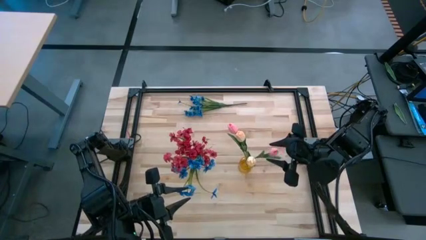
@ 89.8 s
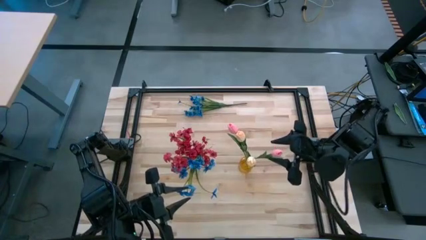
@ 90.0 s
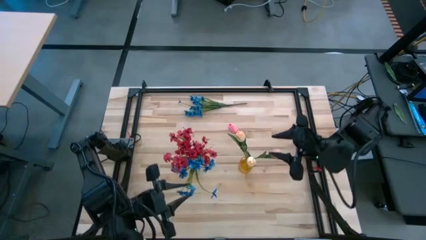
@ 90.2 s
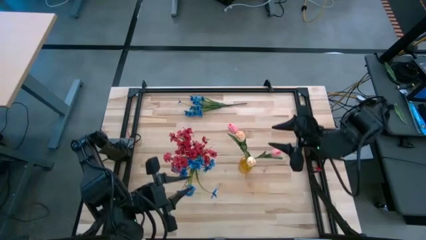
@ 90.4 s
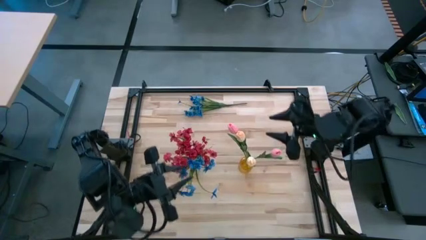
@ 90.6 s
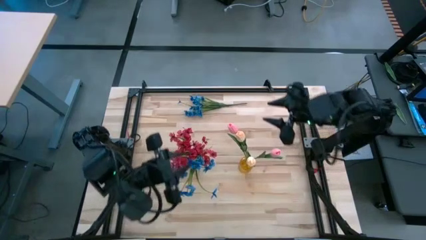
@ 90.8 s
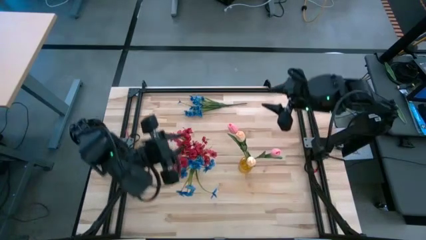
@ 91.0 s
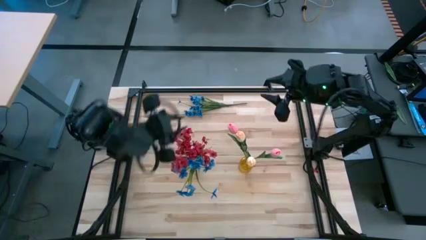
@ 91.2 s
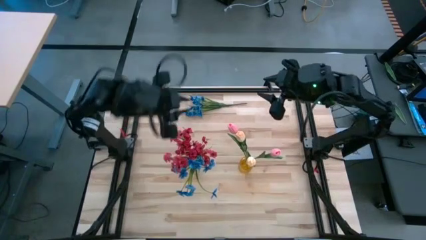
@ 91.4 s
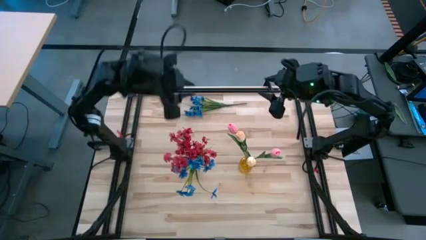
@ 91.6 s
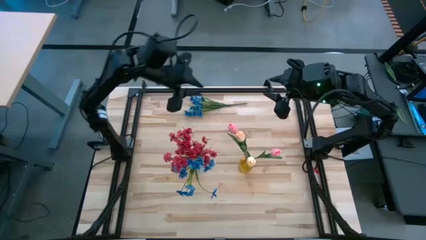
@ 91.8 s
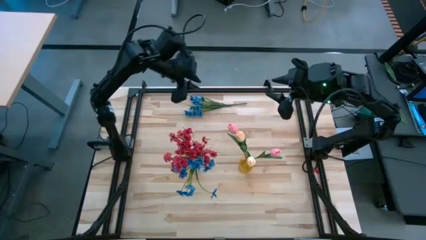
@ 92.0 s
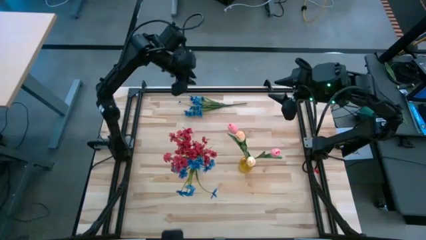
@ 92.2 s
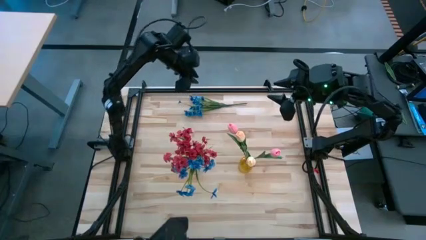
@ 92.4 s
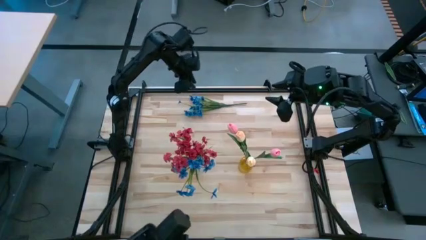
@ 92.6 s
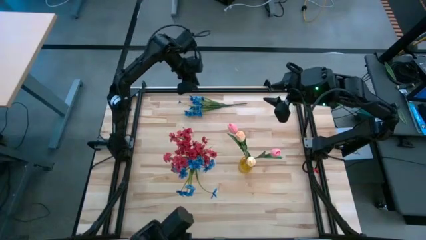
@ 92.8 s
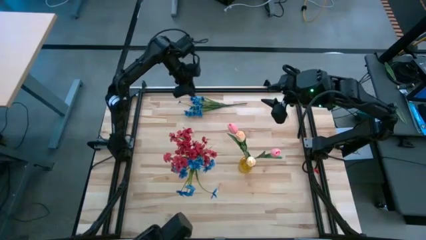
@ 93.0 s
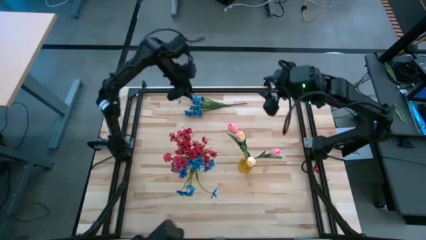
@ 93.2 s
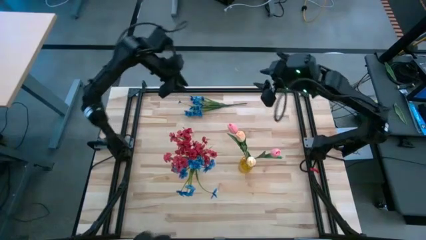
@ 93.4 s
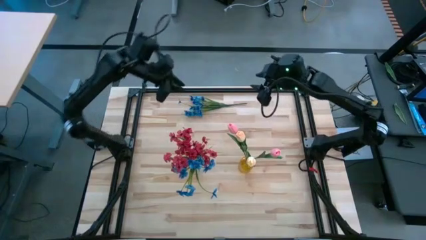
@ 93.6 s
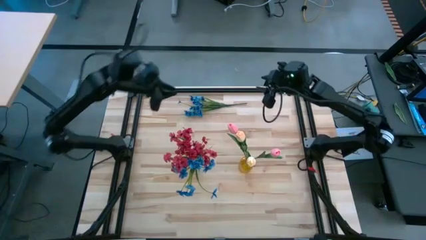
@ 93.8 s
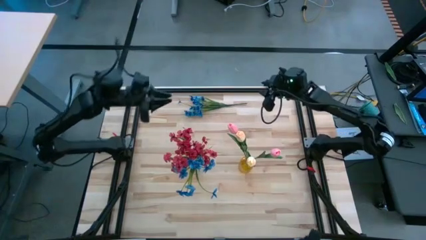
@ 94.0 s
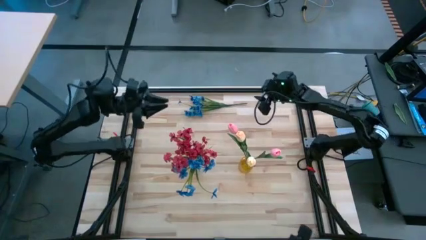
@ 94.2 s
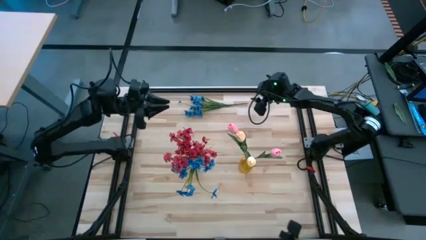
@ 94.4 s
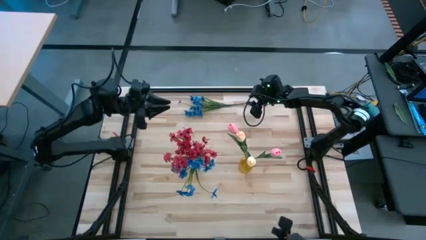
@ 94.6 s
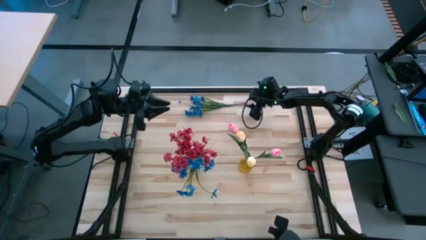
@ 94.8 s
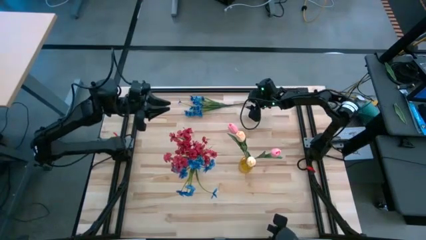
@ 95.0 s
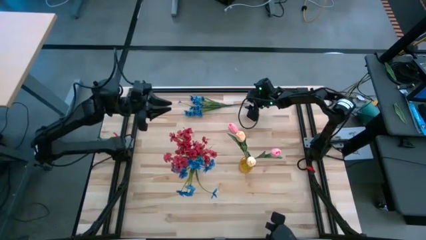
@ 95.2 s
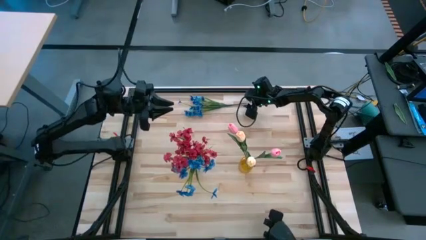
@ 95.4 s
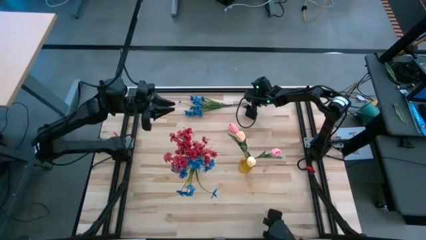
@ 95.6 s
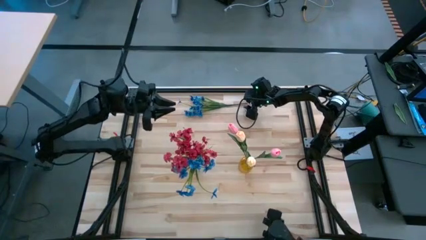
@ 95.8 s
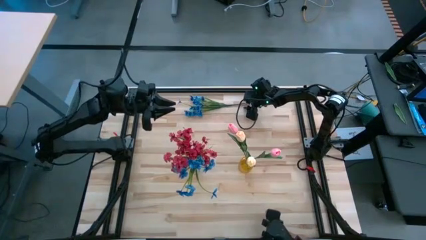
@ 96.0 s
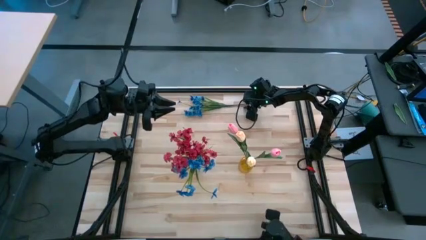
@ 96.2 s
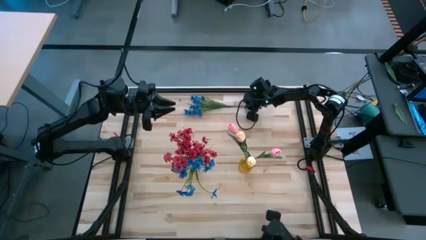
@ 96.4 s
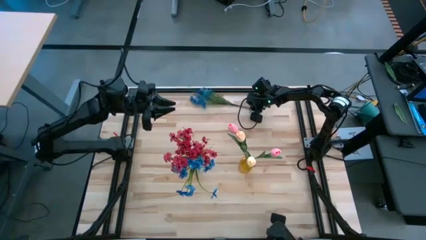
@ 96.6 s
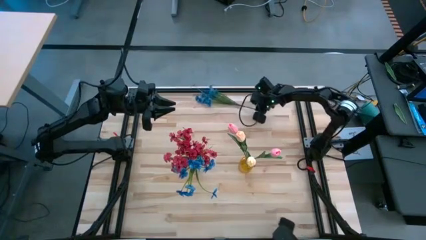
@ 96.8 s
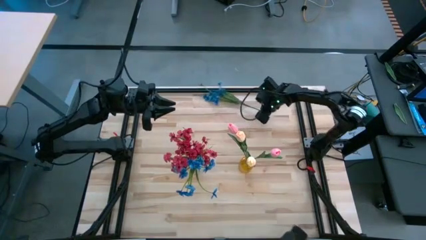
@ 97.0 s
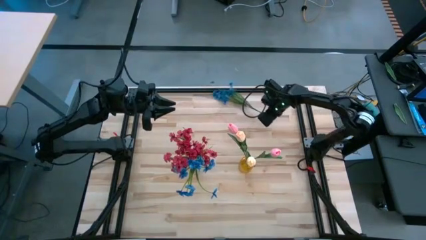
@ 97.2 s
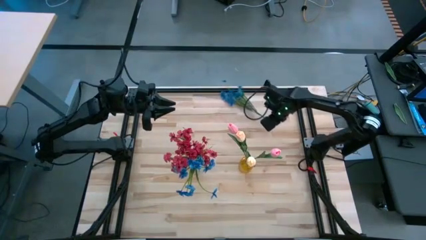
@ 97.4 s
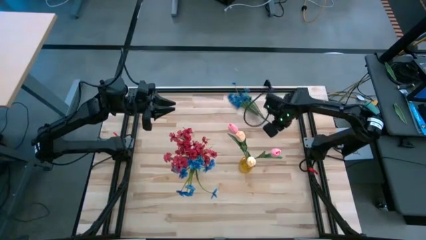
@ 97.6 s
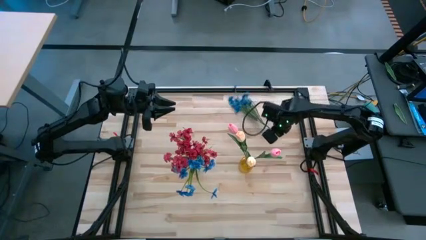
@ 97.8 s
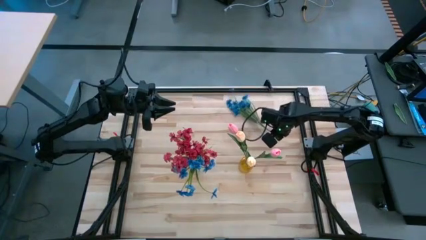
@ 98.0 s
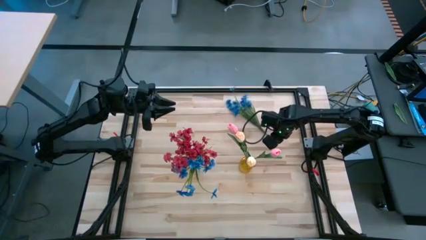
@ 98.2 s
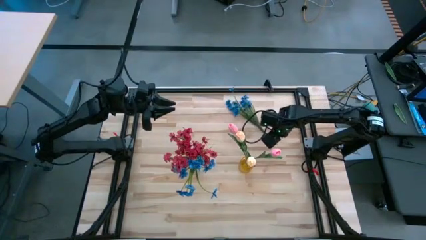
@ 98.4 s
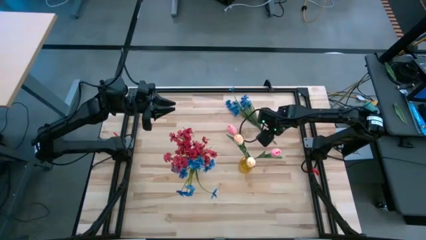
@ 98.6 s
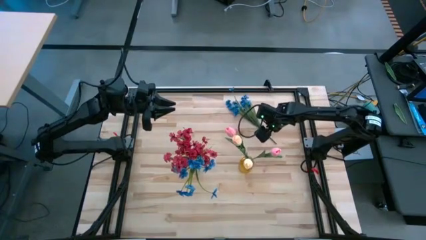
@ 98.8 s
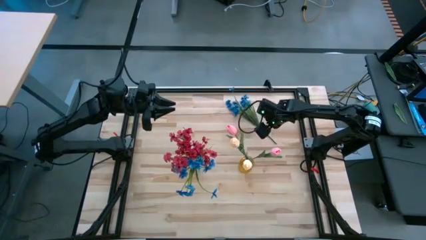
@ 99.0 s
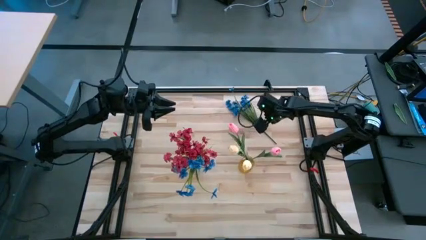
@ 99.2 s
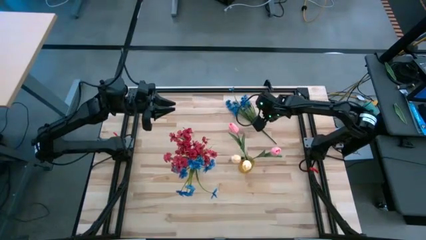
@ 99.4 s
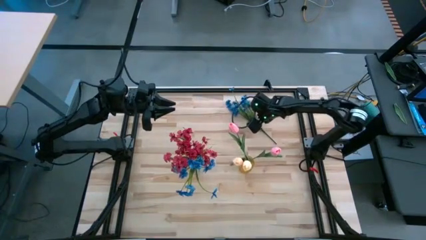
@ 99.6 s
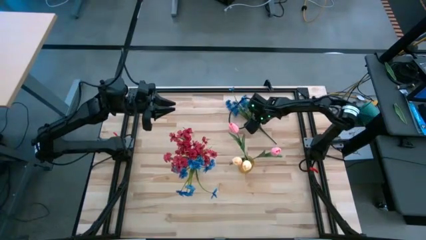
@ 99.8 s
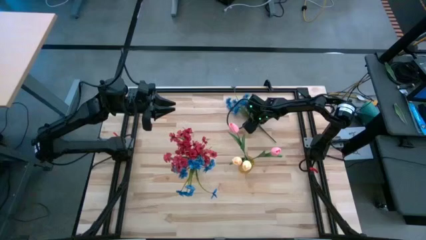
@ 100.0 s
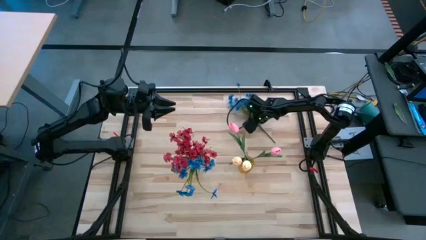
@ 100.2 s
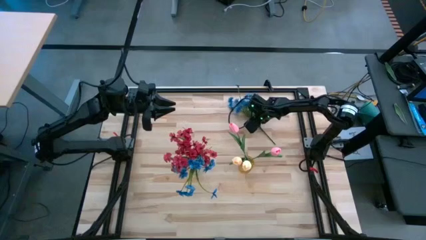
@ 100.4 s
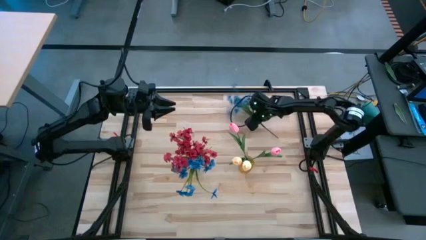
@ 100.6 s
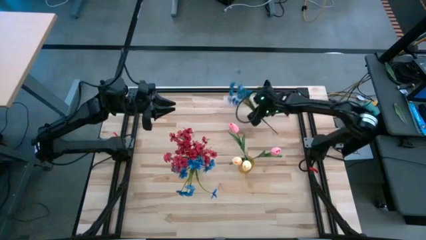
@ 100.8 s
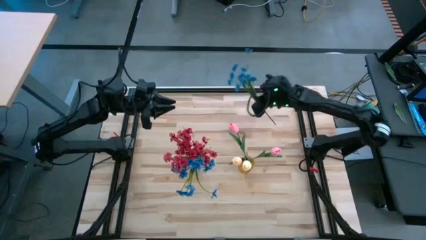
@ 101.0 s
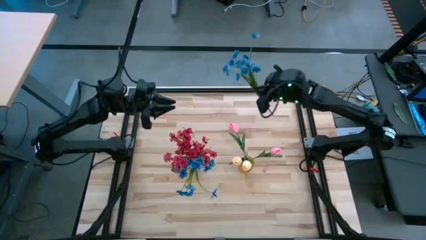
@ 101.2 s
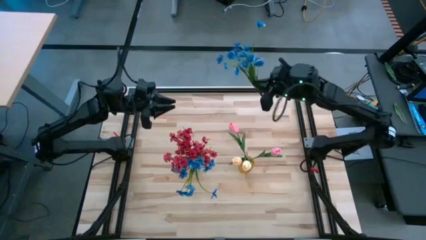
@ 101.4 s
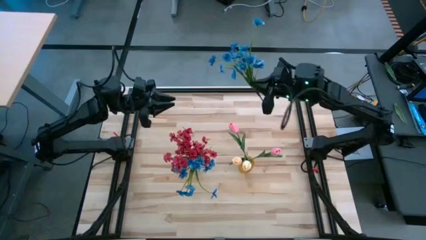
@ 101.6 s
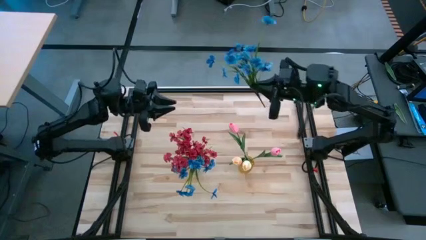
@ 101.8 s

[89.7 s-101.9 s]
Task: Sort flowers into vase by color
Put the blue flower into the transparent vase

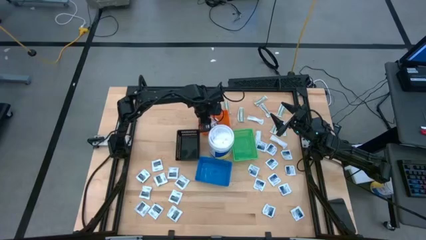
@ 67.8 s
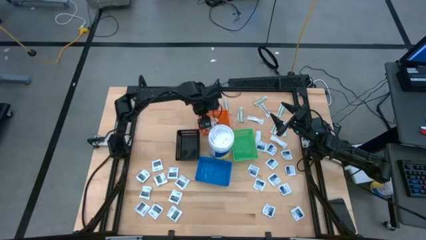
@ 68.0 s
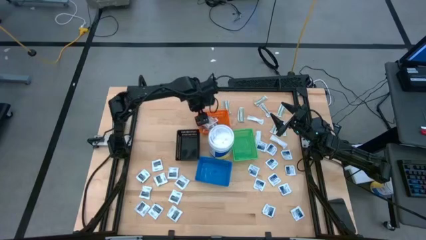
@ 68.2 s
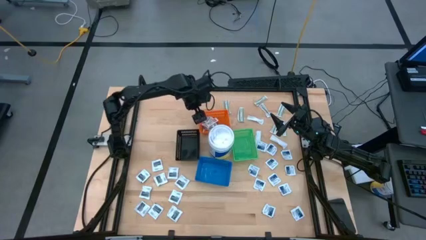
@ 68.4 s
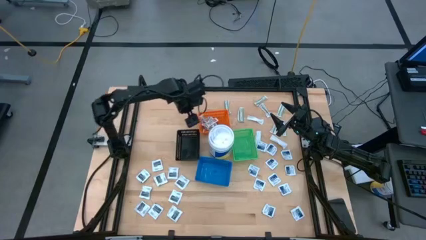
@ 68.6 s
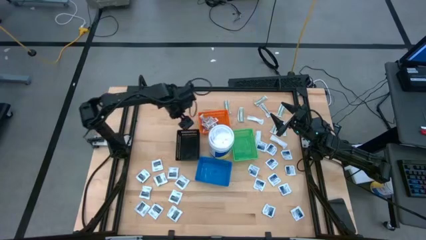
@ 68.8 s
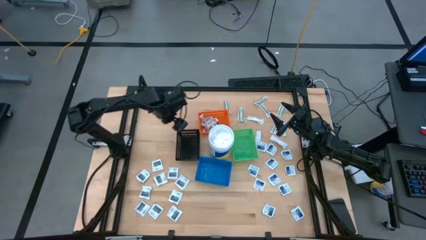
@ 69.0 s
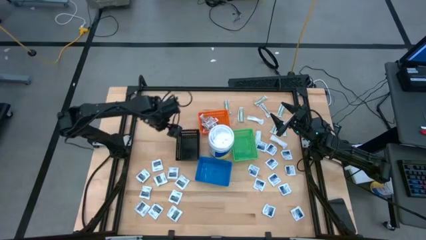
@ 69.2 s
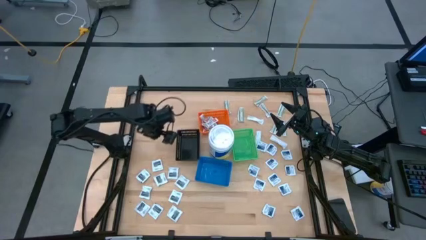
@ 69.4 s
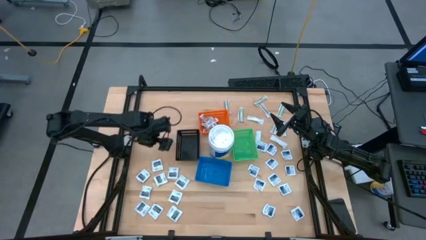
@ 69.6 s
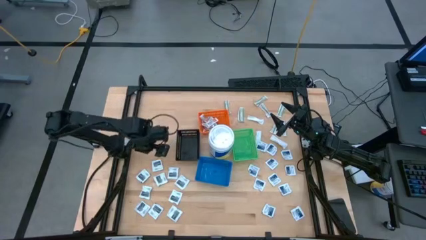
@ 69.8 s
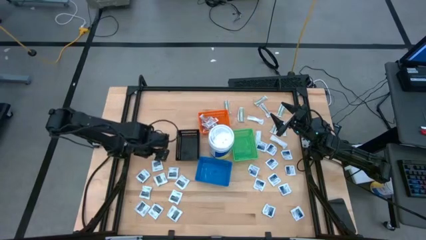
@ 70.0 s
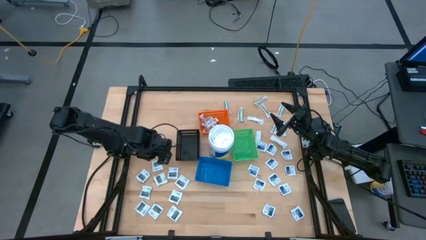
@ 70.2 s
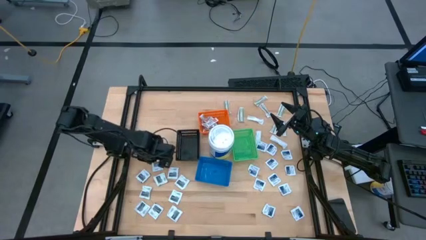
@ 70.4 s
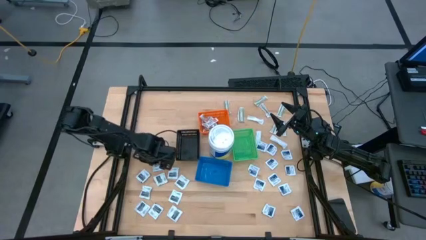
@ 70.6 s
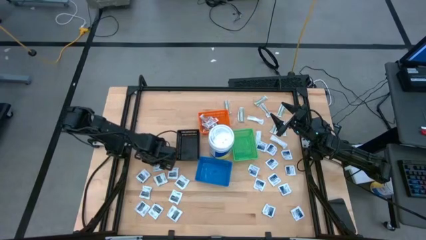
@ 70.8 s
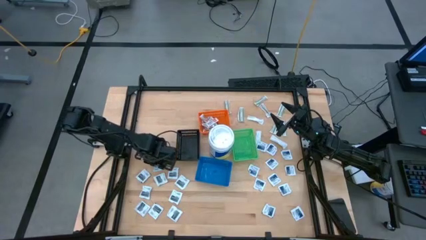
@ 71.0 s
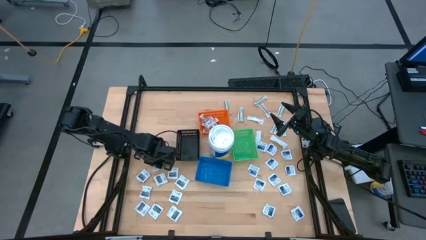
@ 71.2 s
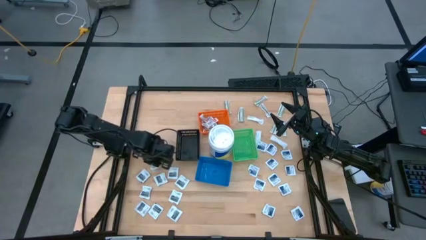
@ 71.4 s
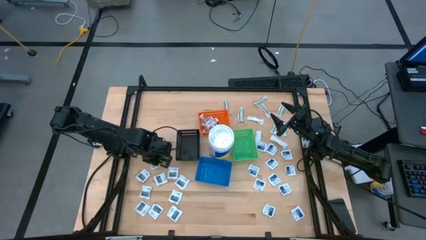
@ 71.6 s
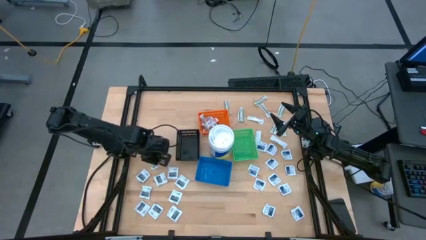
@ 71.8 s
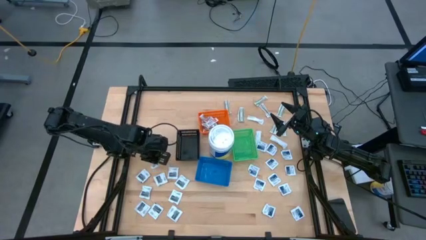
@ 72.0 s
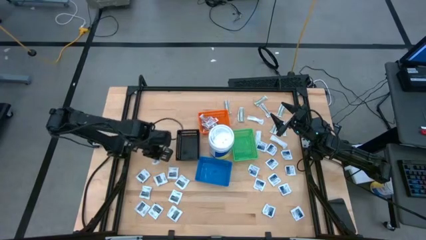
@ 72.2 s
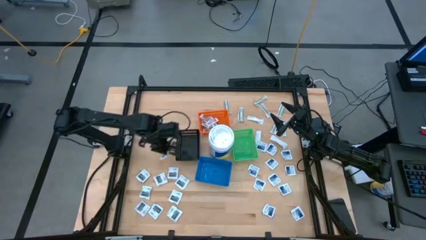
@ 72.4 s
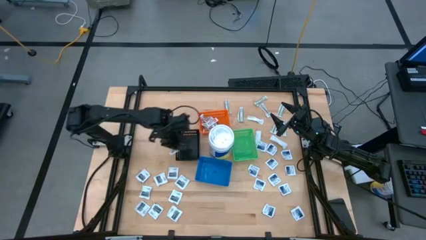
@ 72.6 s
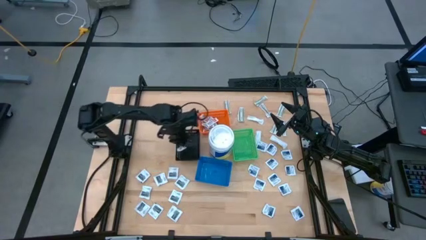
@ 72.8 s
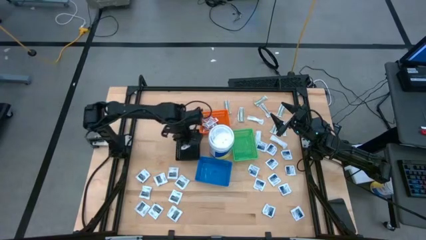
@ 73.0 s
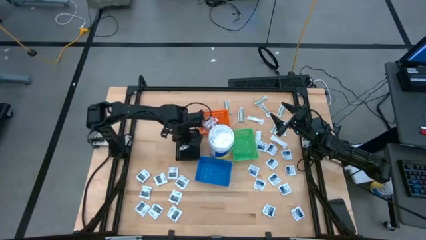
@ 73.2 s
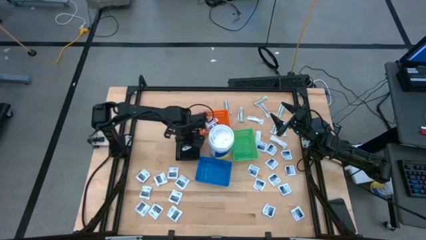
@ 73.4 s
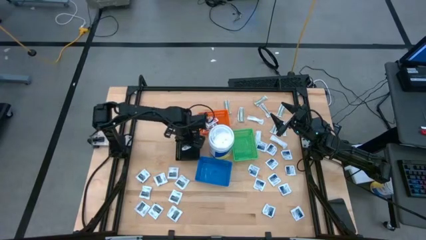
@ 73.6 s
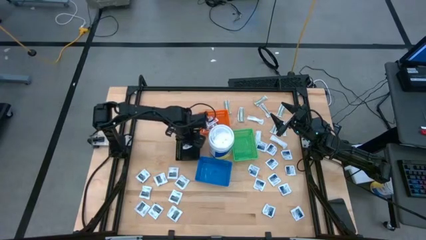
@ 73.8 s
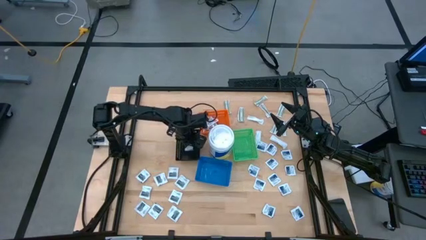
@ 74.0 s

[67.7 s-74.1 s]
Task: Pick & Place First Aid Supplies
Put the gray towelette pack into the black bin
